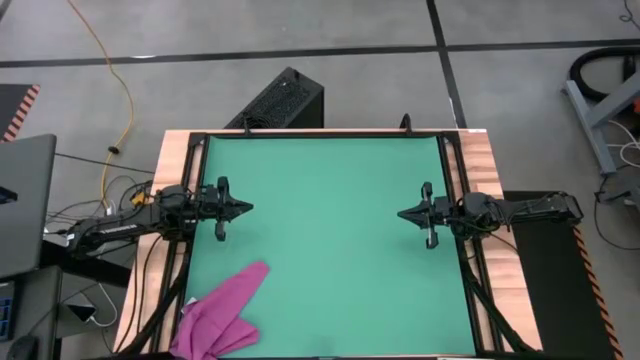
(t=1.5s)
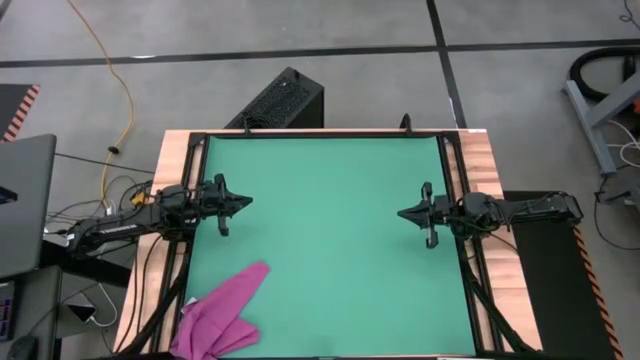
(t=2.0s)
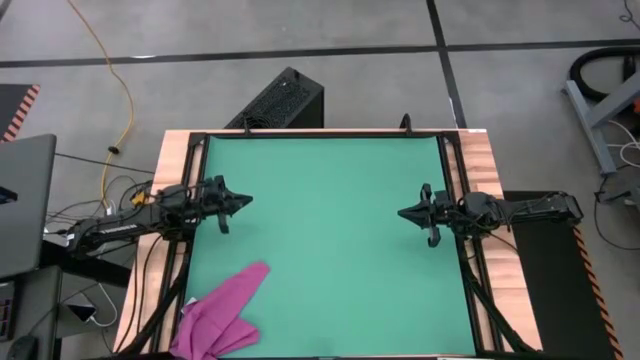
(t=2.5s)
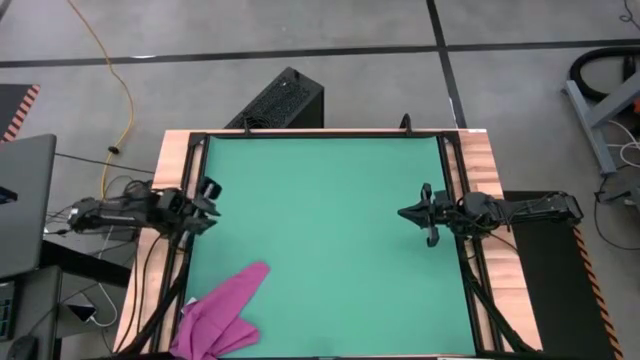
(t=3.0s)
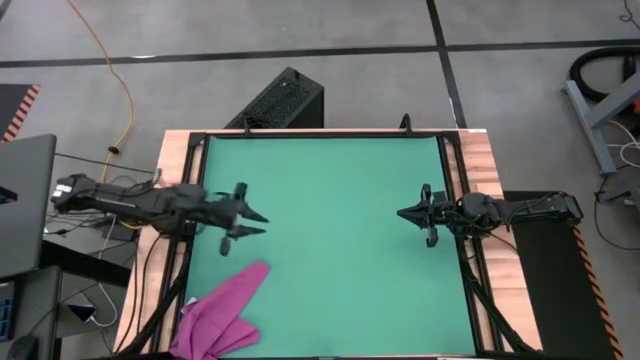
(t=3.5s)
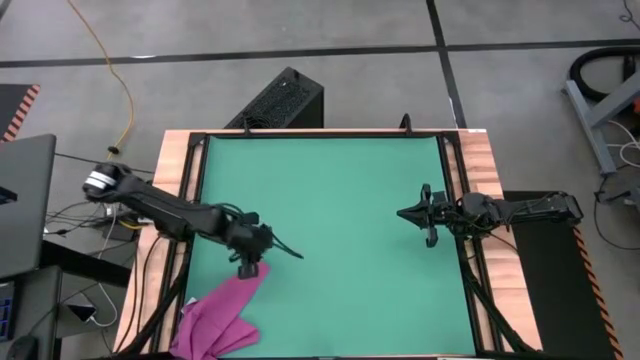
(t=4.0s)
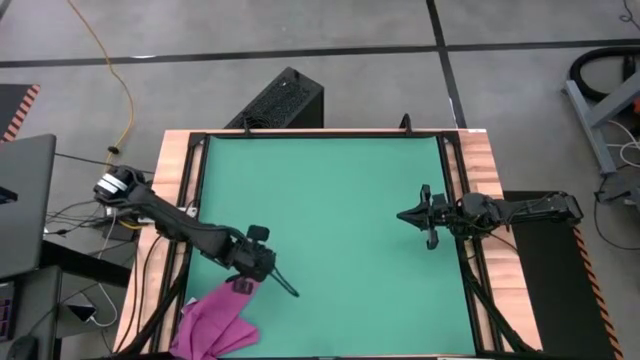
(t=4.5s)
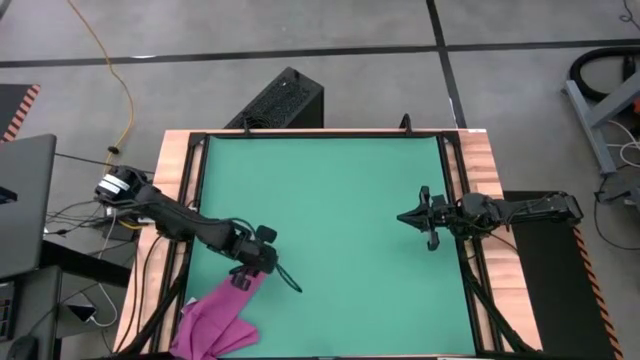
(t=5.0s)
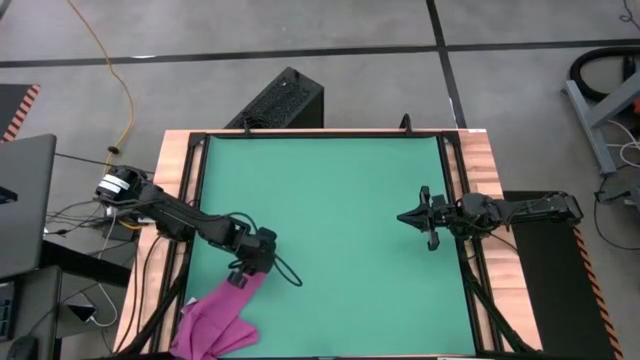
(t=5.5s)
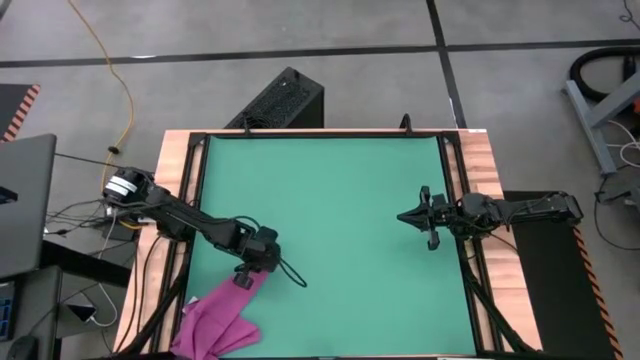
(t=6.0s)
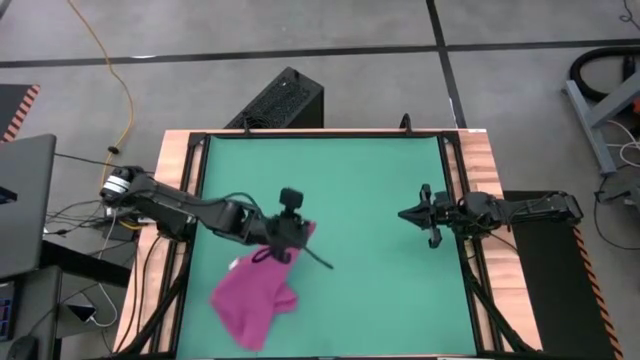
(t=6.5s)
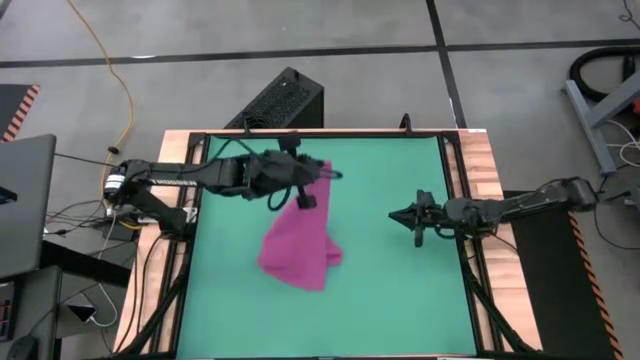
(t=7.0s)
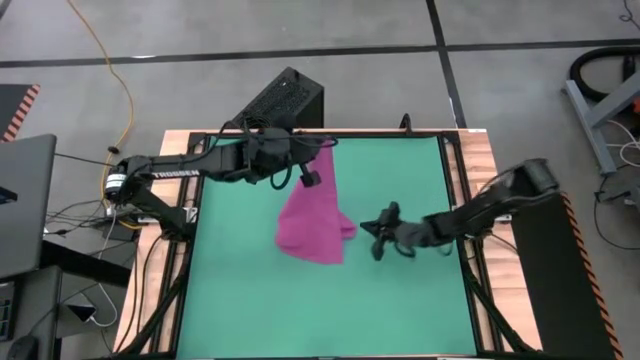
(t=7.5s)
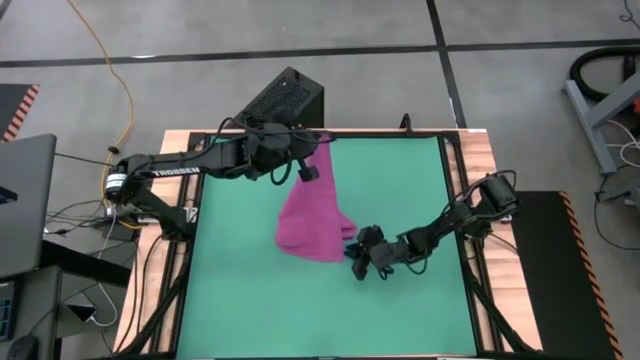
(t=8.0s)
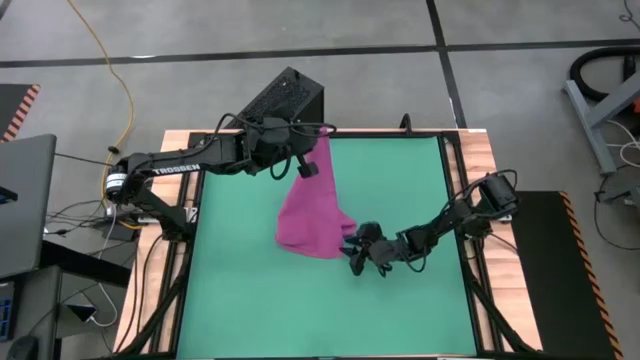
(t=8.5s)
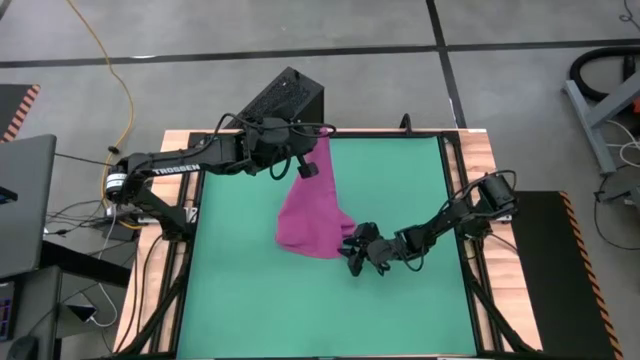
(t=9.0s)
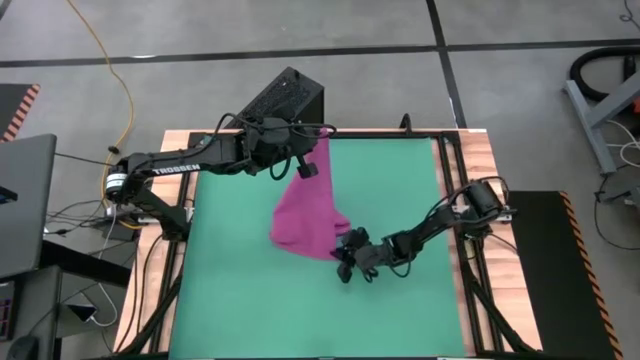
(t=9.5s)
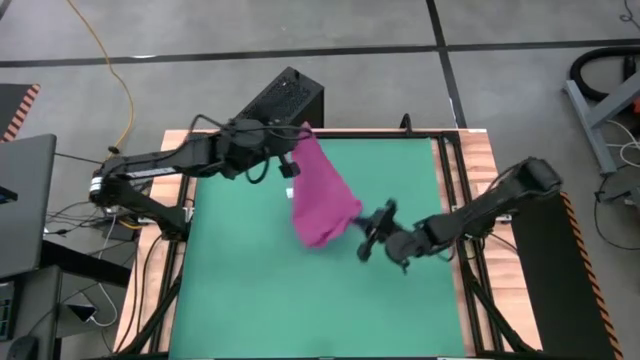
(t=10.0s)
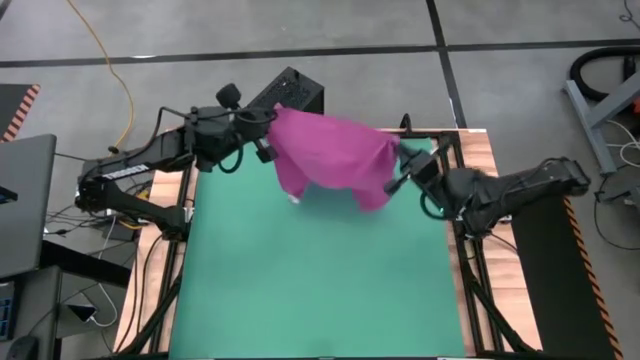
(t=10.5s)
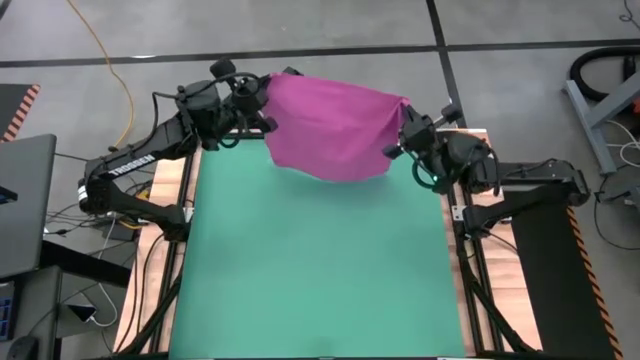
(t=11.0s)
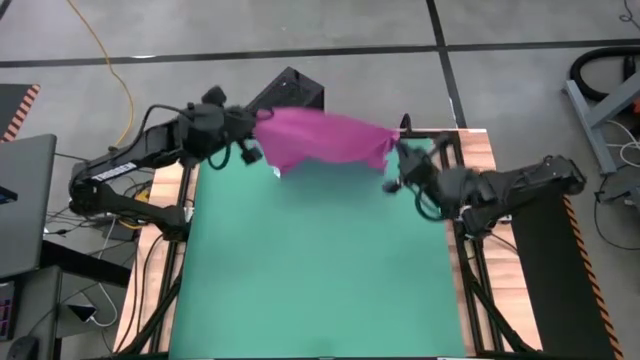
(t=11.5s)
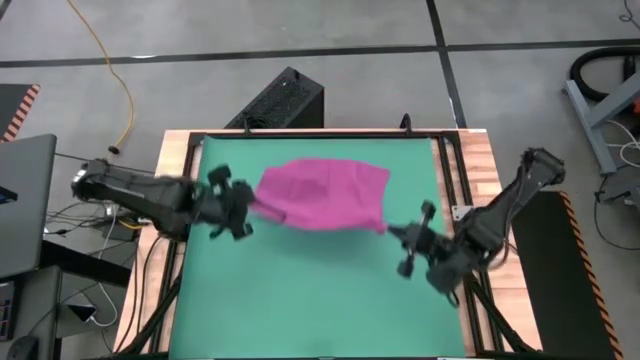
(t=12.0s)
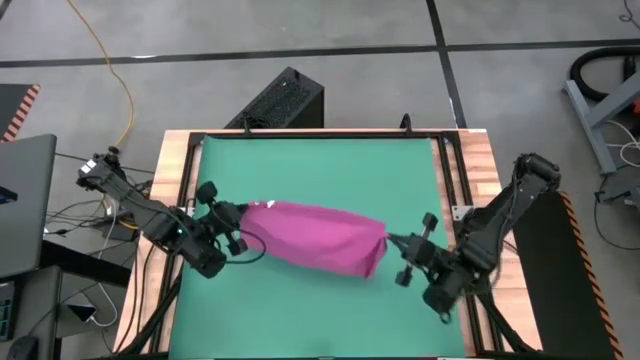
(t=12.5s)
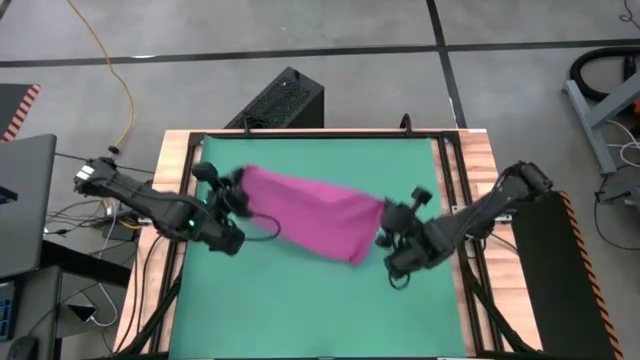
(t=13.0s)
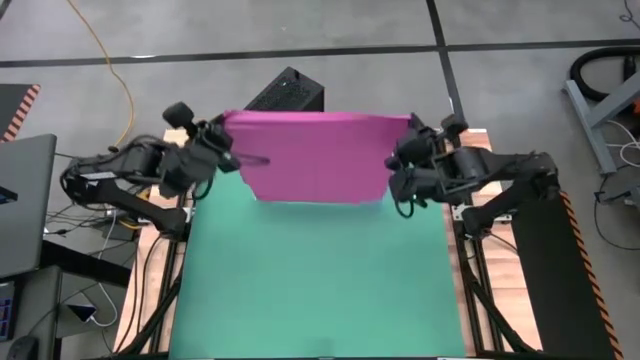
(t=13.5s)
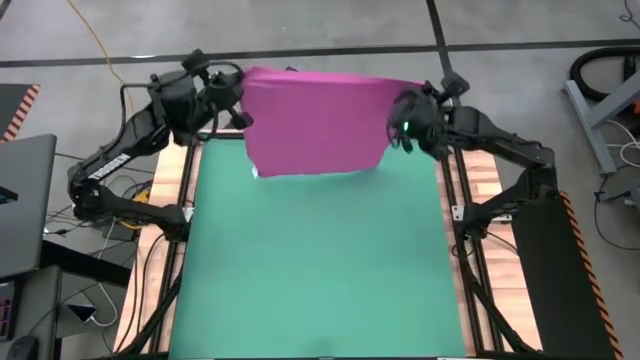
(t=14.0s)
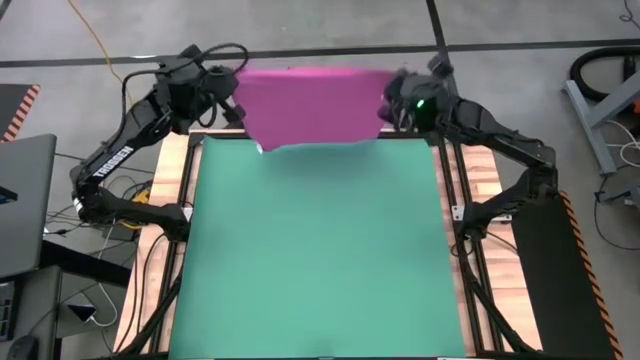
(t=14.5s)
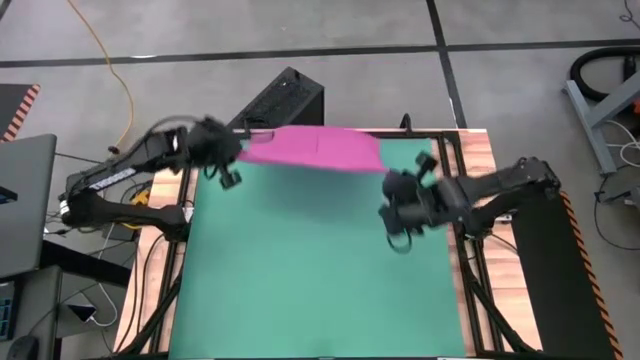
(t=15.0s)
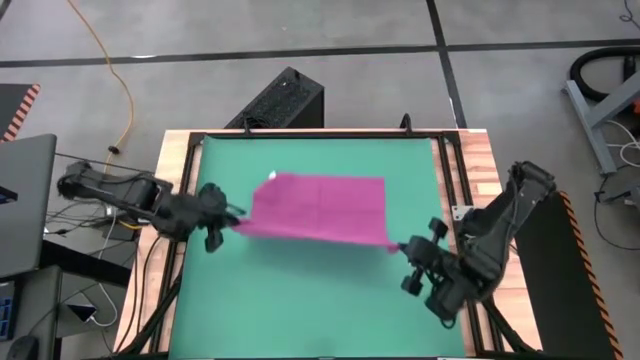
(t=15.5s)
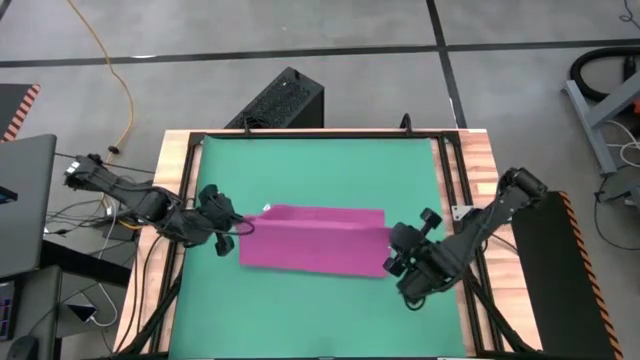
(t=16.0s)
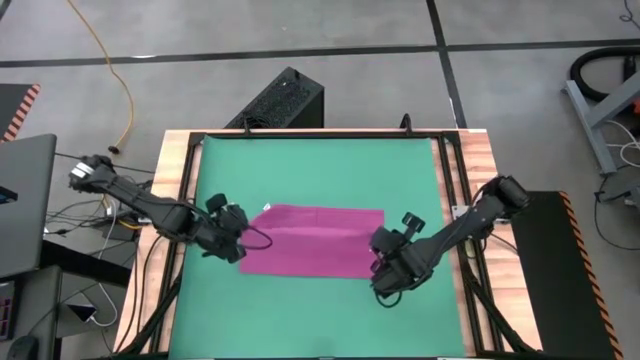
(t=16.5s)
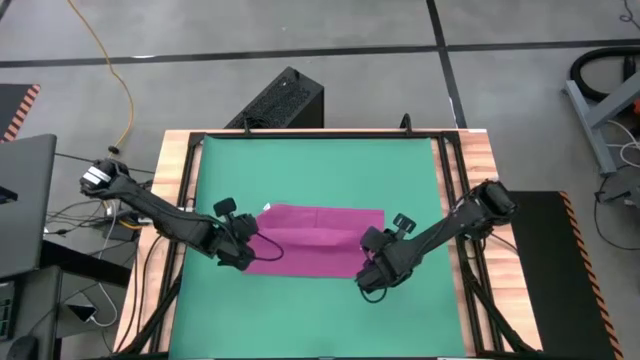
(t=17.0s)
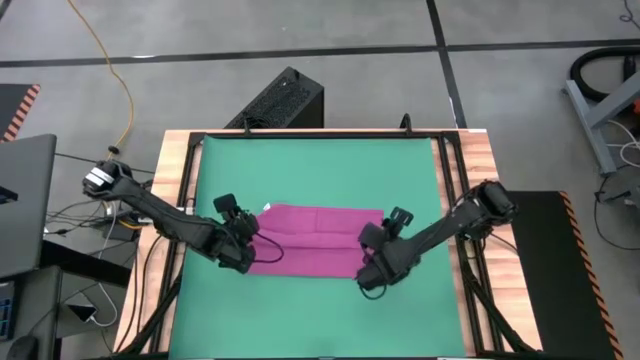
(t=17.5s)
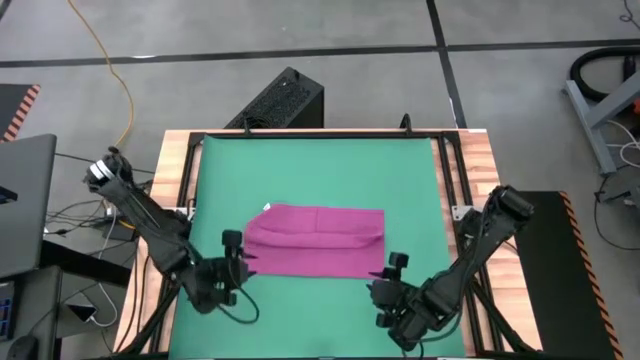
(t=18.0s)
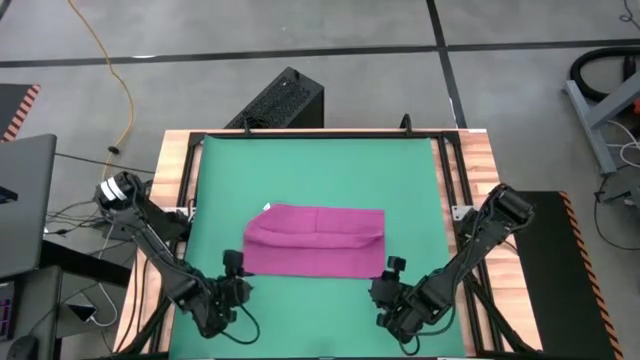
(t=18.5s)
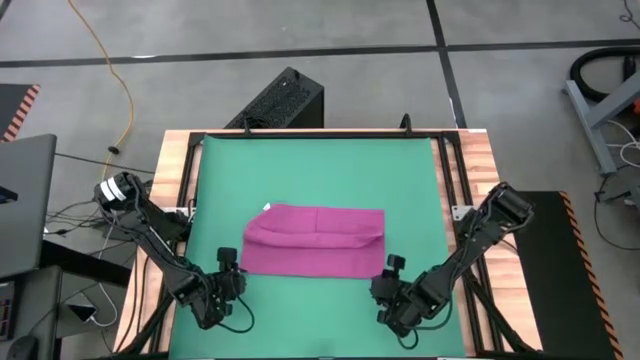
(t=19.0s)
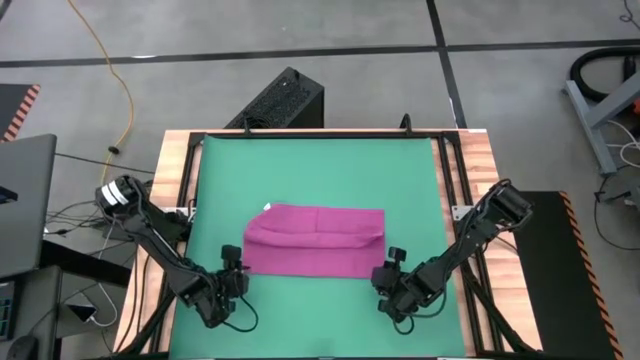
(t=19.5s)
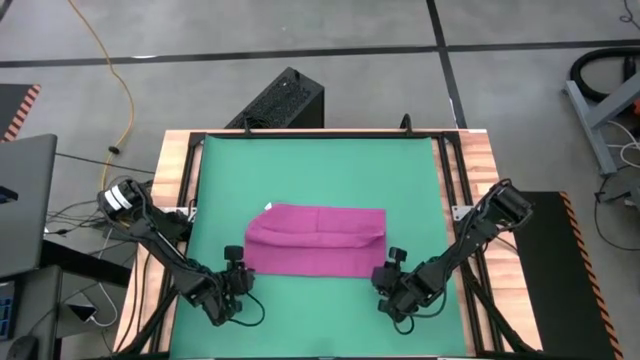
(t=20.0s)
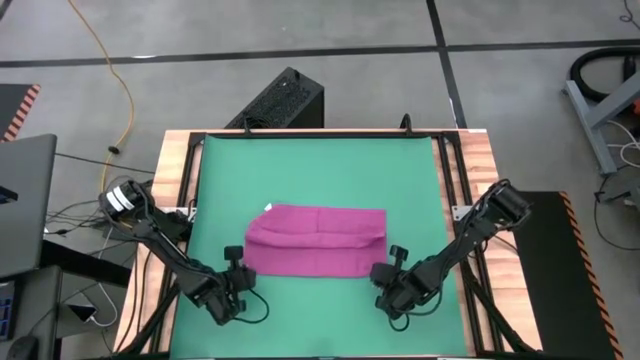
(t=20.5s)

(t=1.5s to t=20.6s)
Task: Roll towel into tight, uniform cylinder
Fold the pink towel

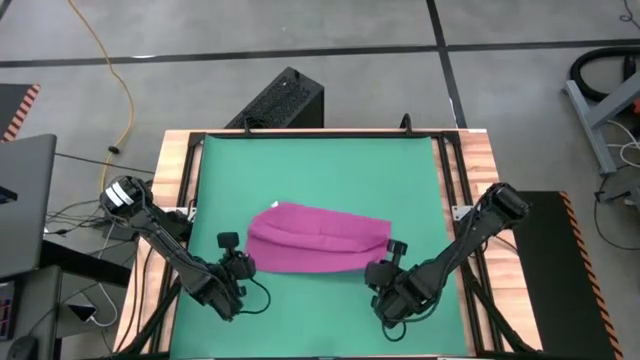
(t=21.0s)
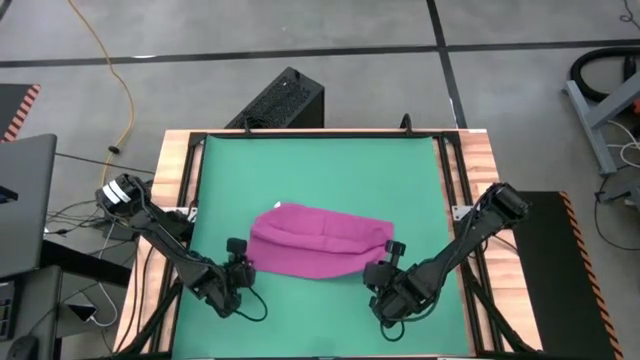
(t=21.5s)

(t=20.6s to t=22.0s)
Fold the pink towel

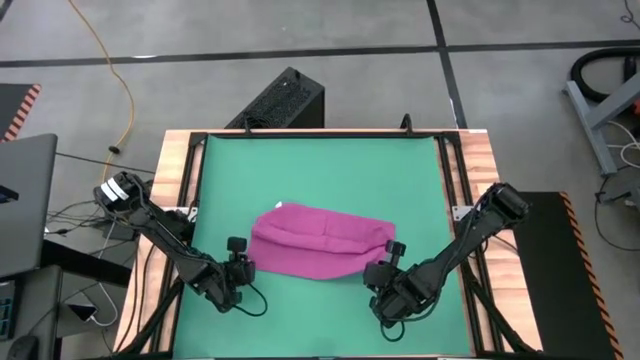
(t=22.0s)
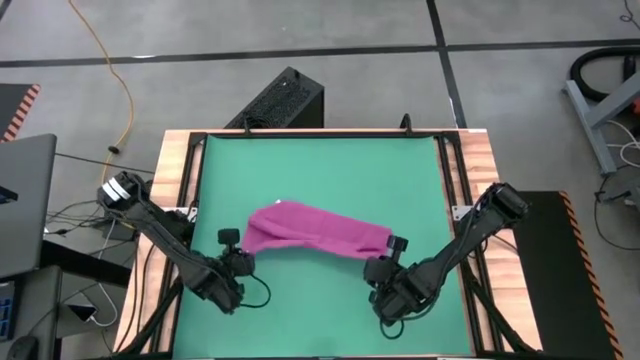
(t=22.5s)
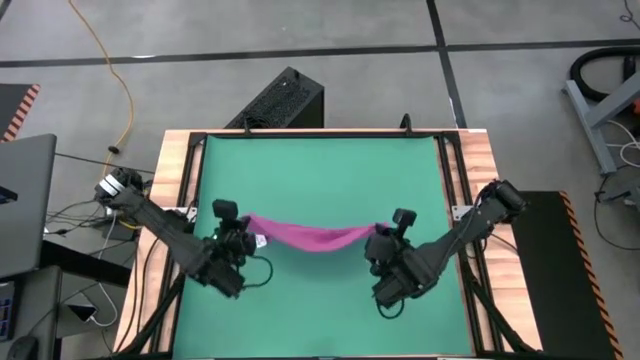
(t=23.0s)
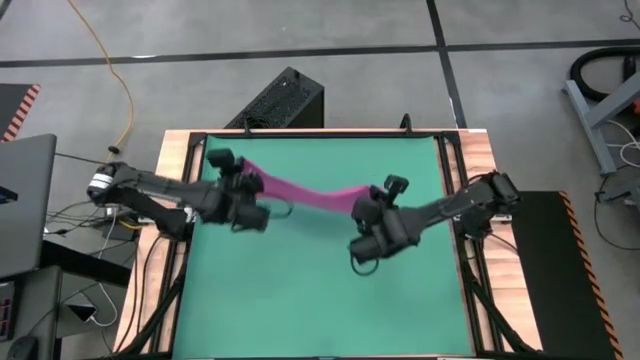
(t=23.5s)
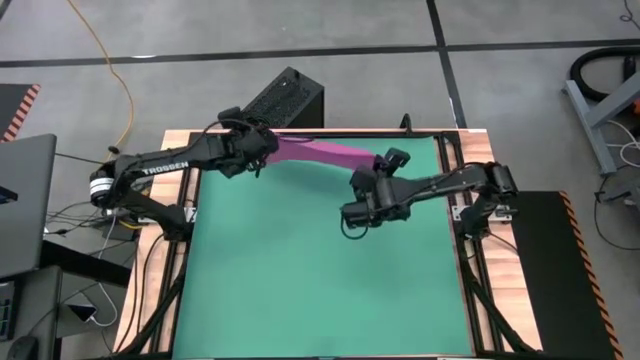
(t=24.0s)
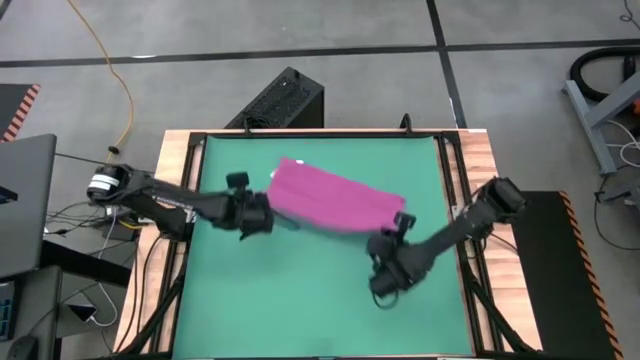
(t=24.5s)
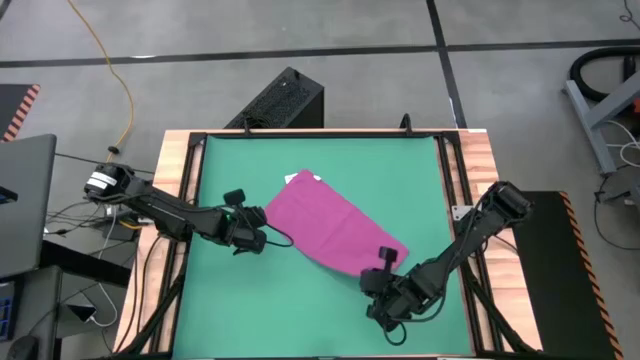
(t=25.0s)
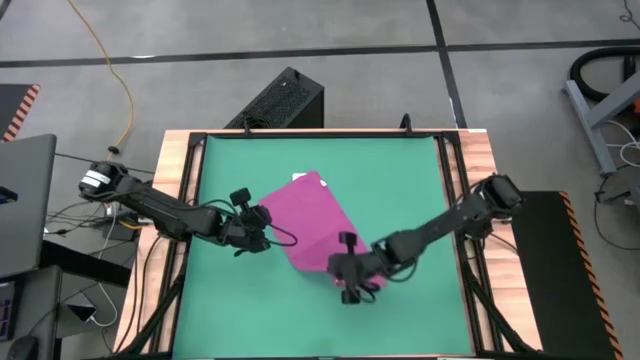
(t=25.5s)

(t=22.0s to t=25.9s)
Fold the pink towel
